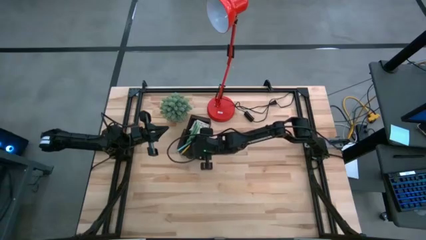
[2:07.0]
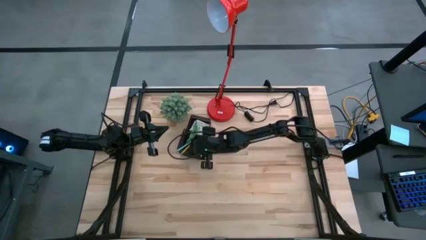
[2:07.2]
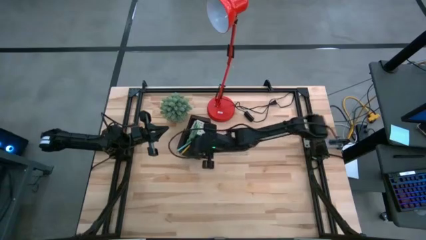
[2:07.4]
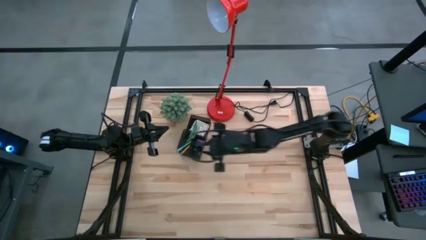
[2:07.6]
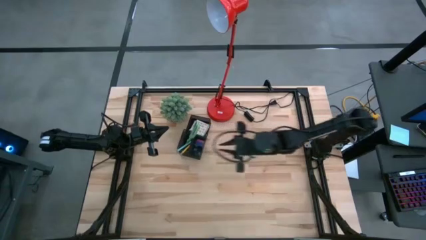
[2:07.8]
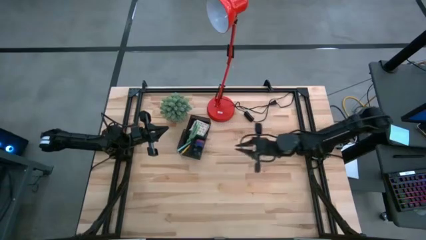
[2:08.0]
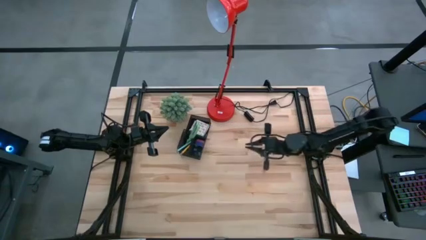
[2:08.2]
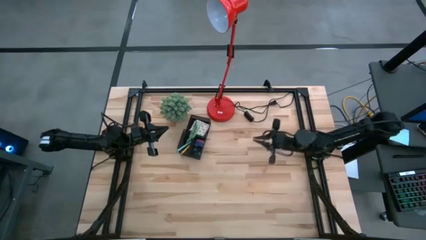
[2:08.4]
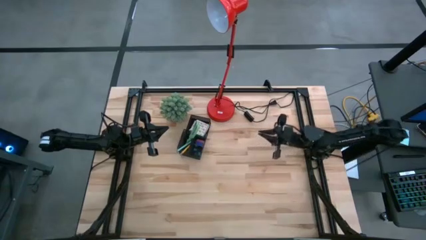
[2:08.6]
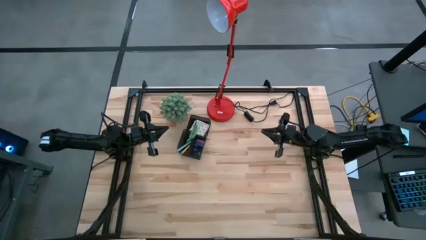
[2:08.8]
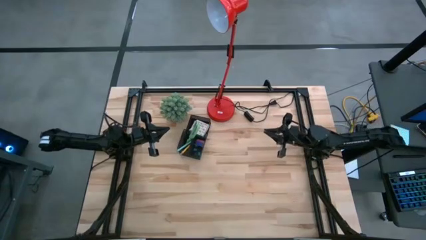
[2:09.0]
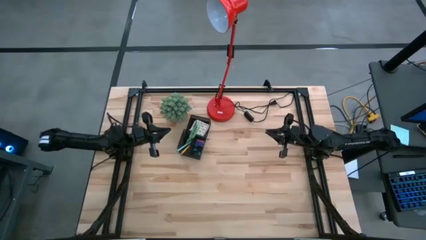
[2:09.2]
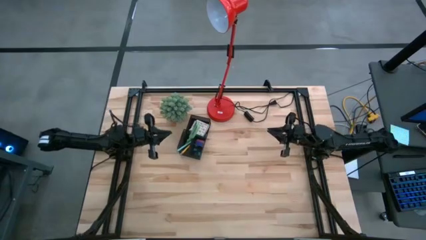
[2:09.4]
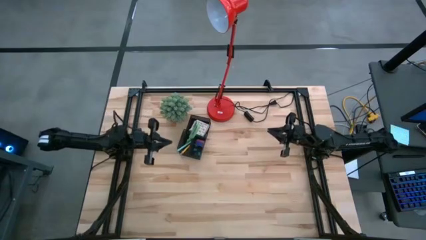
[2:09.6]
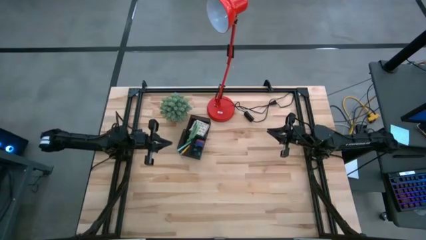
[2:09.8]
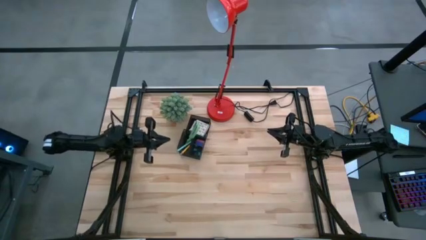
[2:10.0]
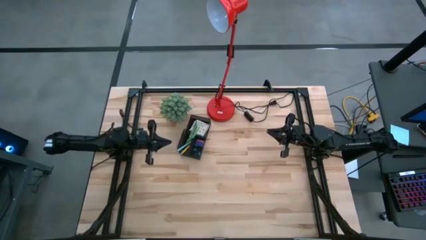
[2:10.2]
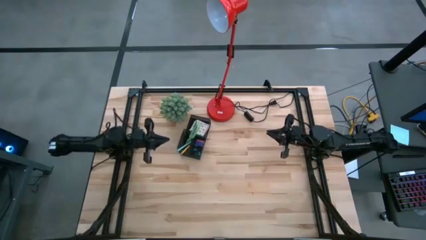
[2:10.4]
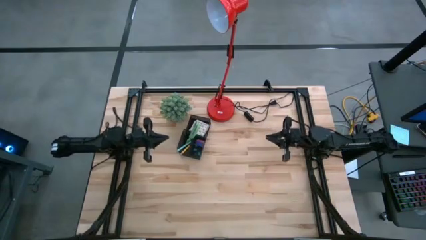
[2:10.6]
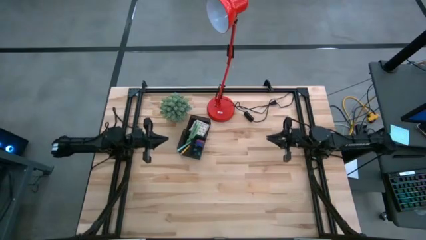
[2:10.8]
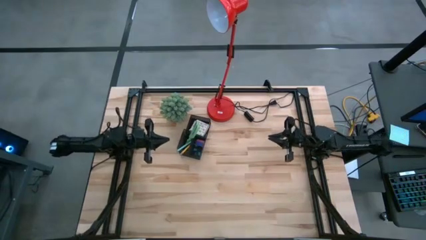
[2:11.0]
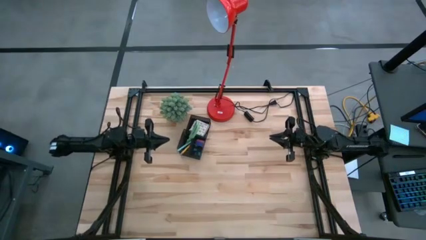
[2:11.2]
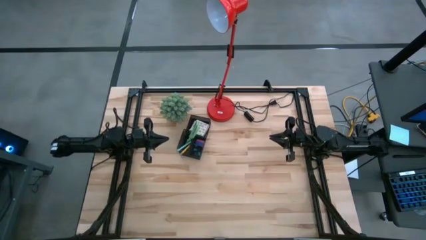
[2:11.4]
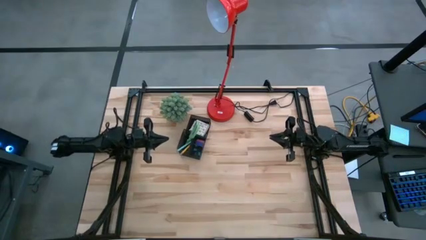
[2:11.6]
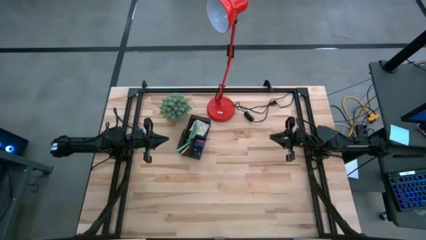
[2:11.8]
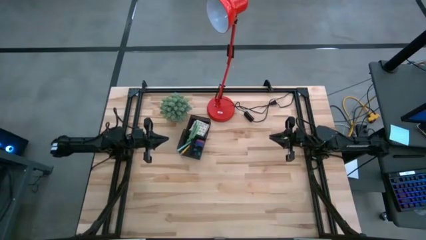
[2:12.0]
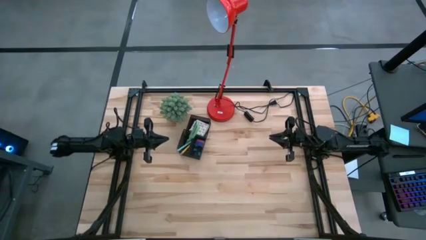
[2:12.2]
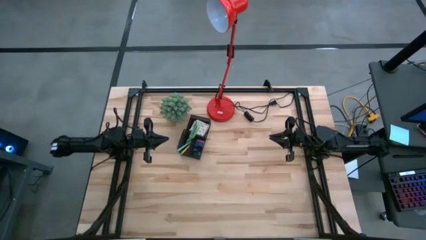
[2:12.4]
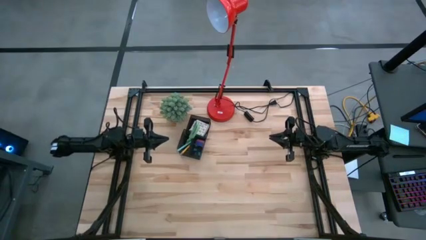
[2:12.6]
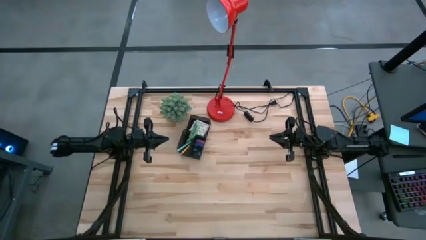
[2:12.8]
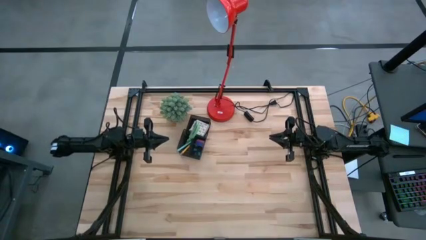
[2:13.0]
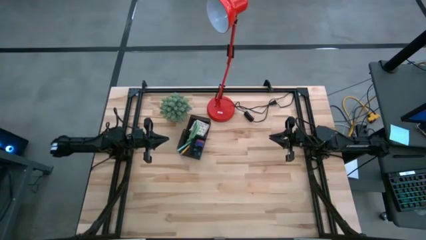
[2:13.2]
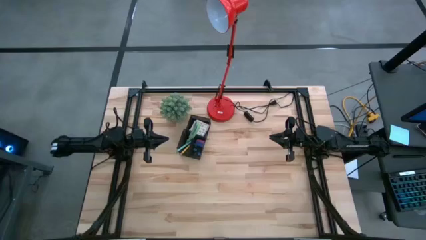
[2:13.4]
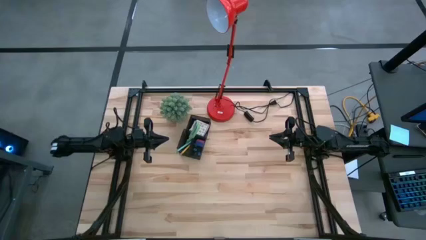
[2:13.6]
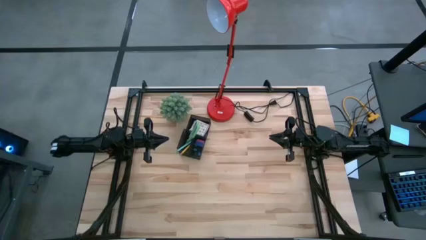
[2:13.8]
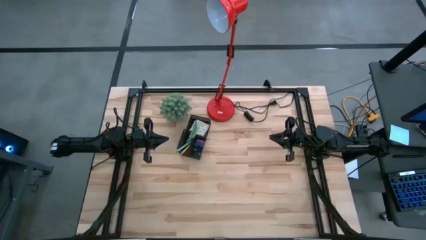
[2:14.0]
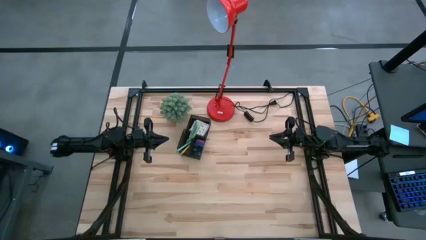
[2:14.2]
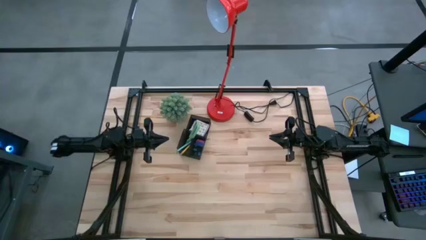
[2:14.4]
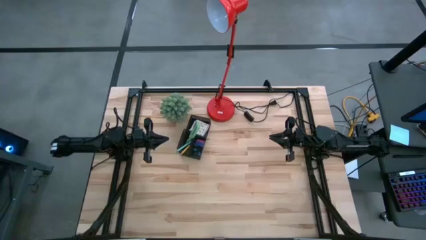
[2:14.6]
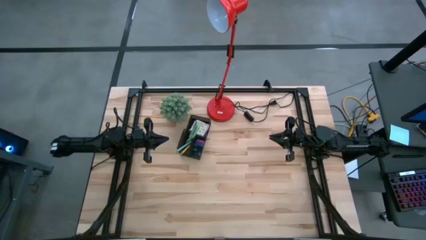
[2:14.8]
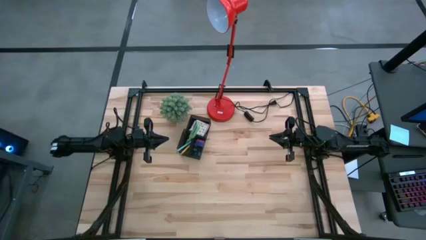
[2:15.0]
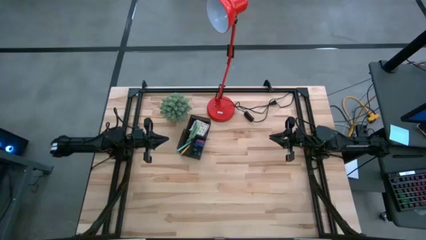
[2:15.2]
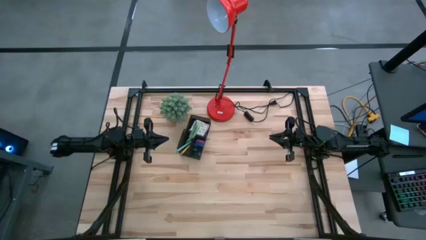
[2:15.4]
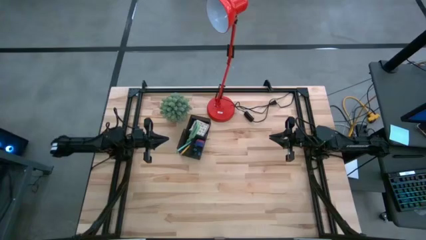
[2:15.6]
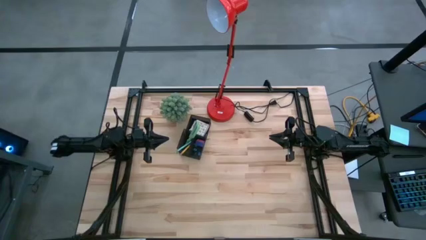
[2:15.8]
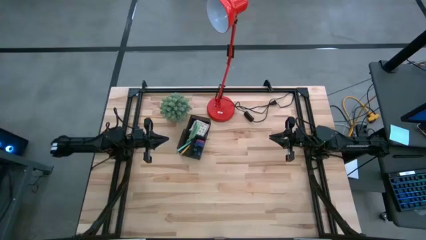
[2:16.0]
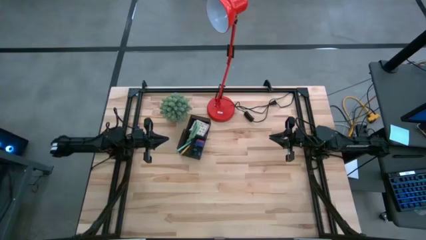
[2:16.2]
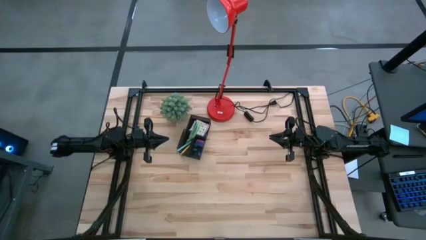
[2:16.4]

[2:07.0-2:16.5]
Task: Pick and place office supplies into organizer
Return to Home Position

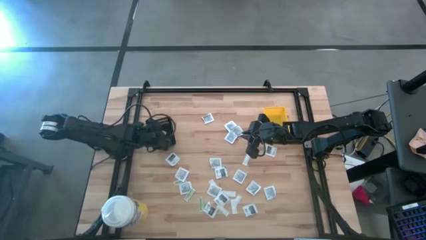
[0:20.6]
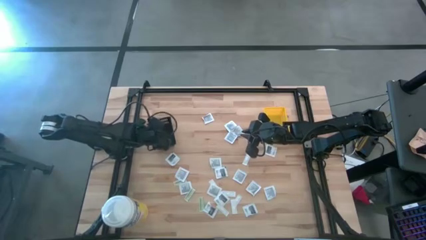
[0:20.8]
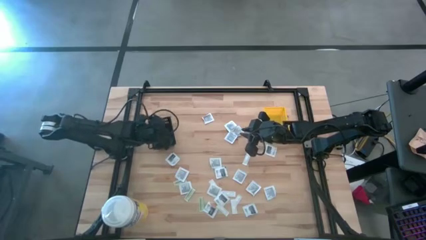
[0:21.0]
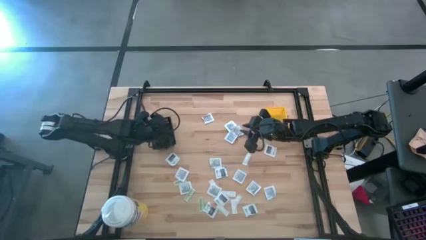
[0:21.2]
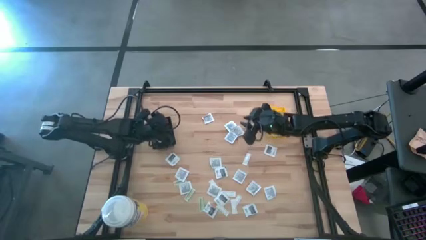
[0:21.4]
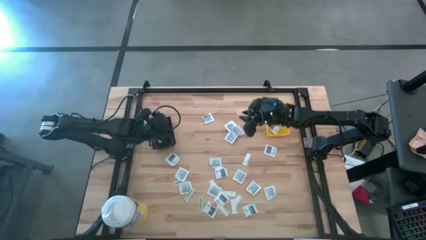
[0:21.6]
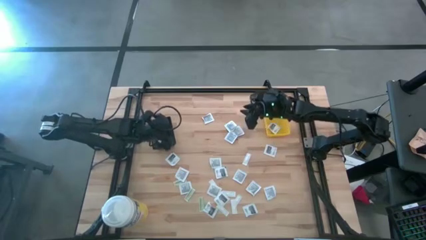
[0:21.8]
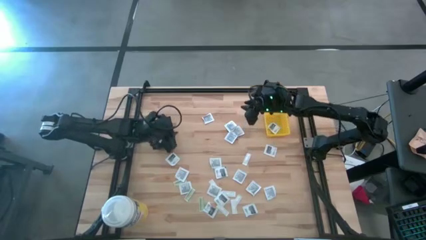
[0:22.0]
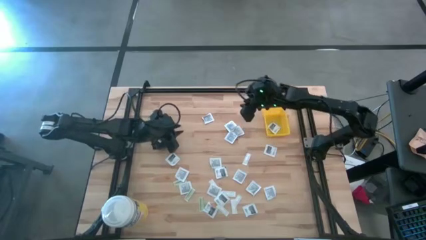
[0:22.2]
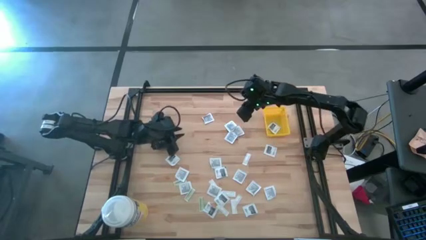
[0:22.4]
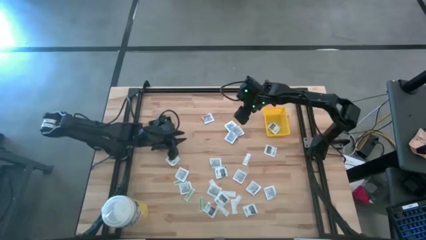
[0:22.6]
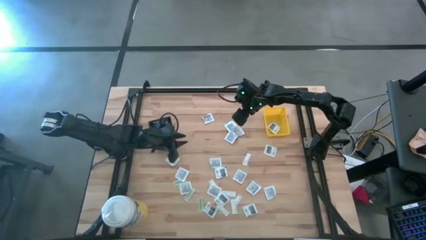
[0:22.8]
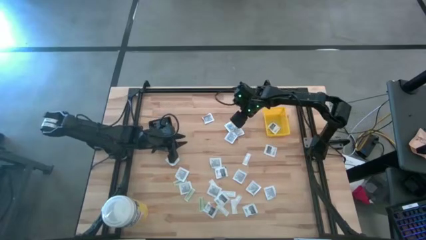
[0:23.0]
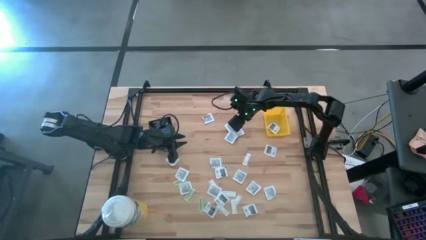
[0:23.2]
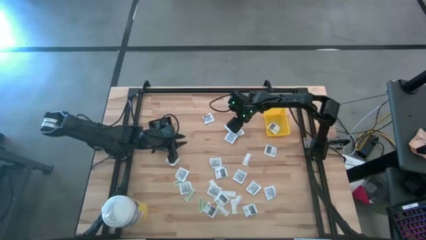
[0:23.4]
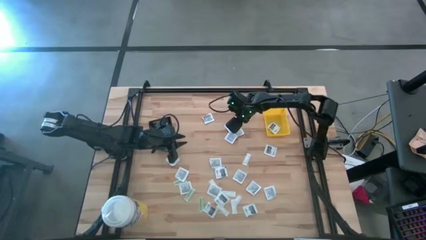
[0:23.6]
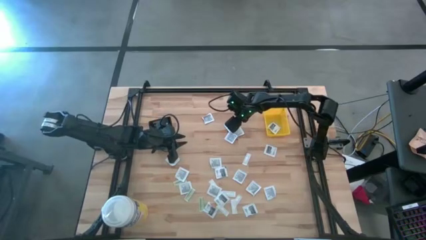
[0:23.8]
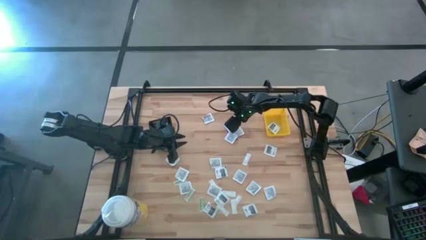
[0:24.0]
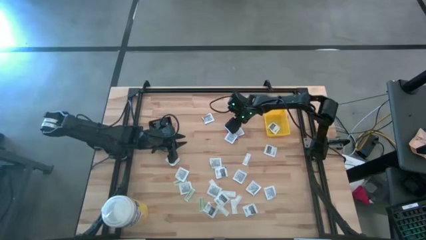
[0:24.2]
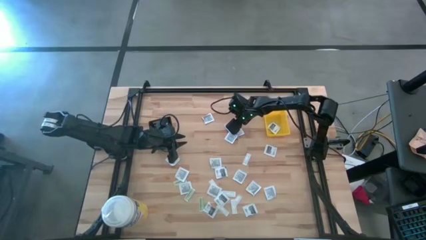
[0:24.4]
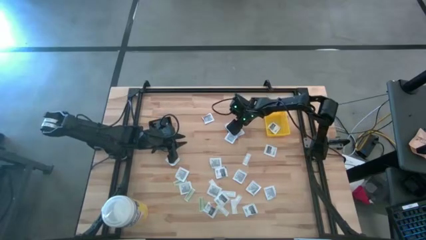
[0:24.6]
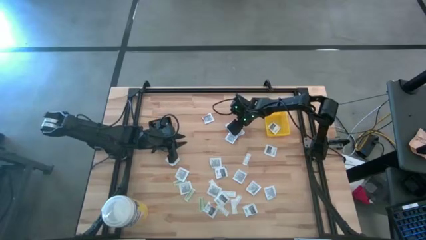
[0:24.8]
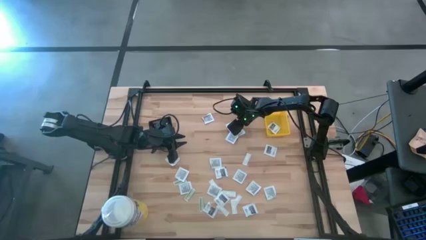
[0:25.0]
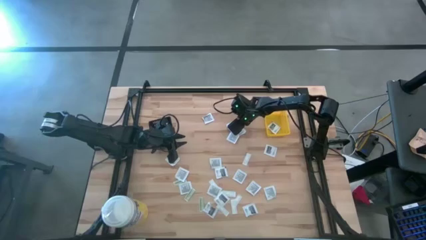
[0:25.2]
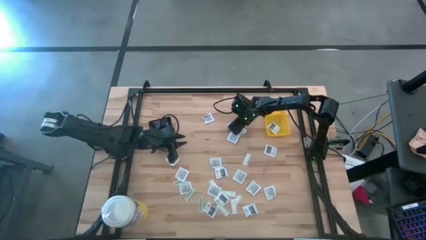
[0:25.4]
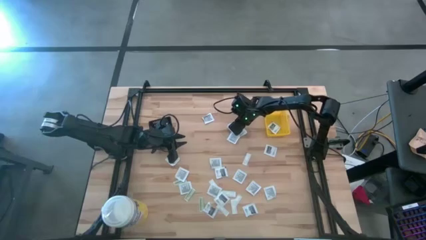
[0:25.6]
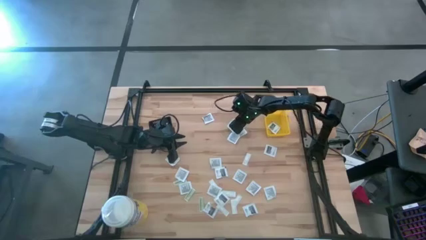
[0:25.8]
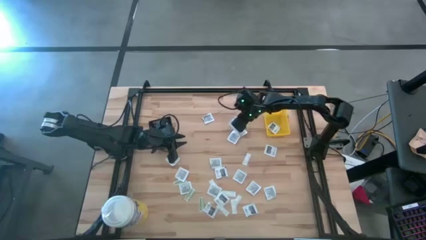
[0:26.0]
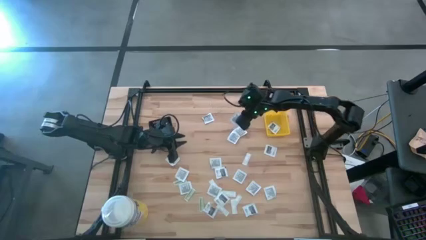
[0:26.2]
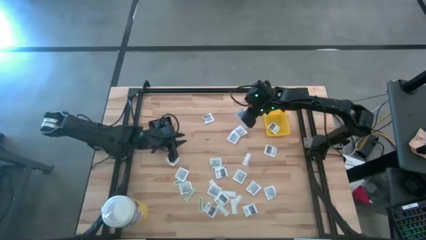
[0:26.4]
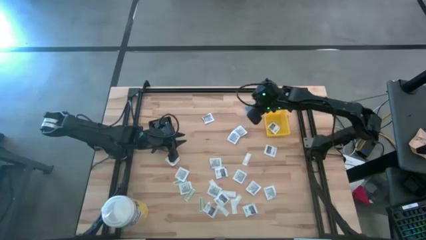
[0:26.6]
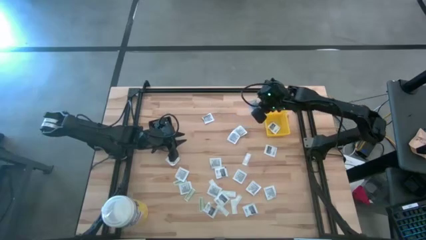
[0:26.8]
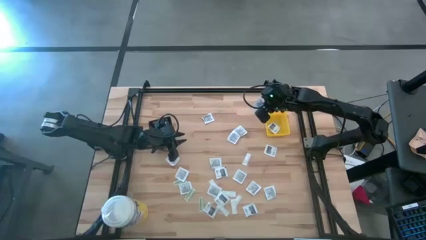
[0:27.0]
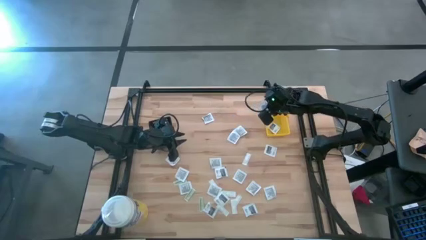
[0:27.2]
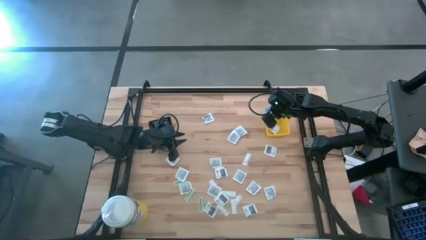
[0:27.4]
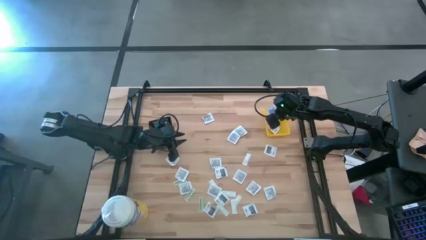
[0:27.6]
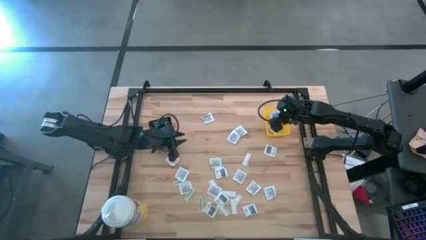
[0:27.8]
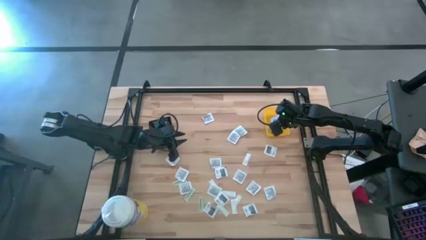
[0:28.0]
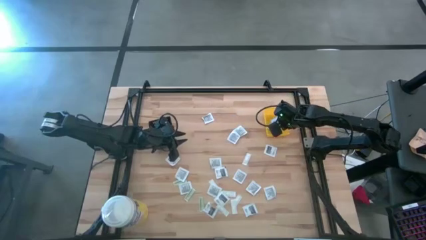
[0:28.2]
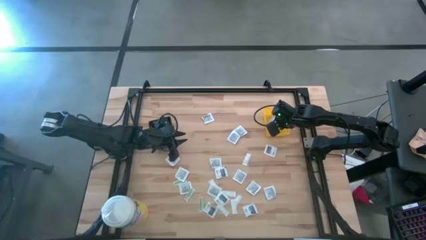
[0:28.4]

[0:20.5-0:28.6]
Task: Pick & Place First Aid Supplies
Put the black pad into the yellow bin
